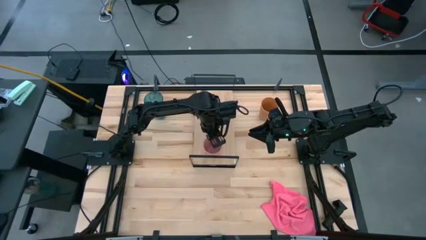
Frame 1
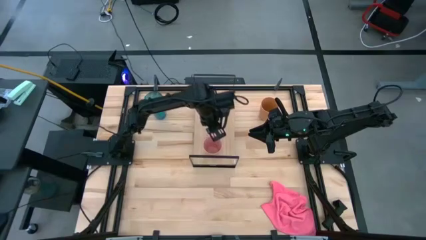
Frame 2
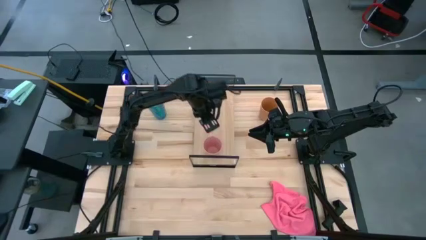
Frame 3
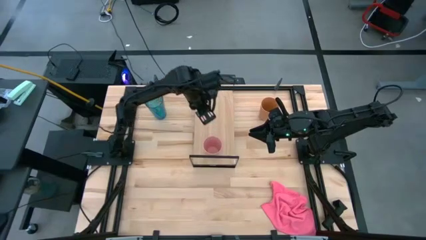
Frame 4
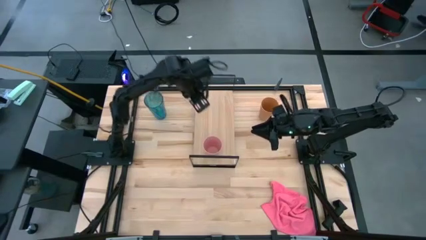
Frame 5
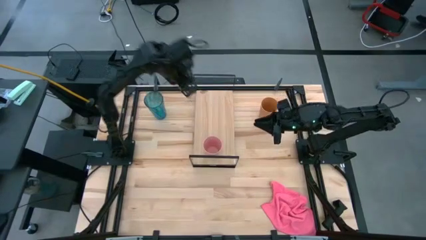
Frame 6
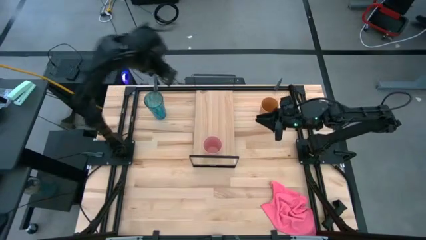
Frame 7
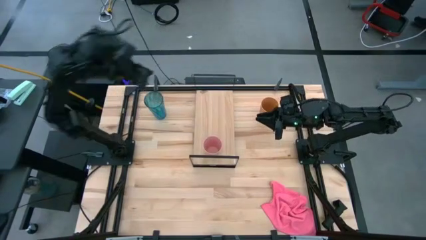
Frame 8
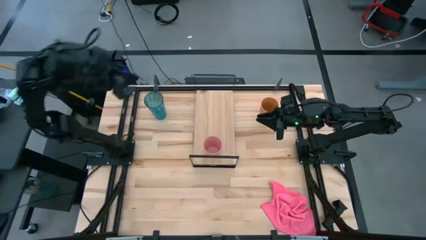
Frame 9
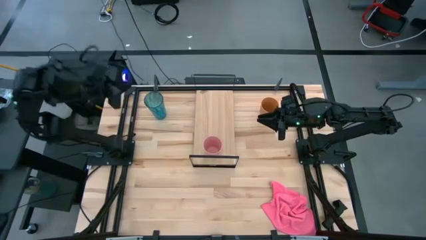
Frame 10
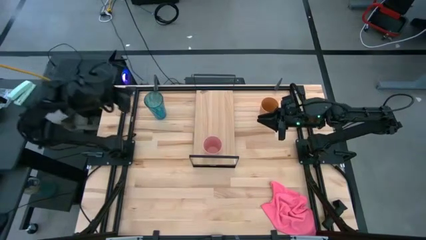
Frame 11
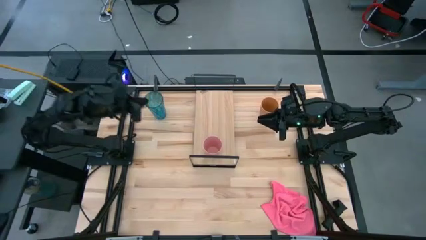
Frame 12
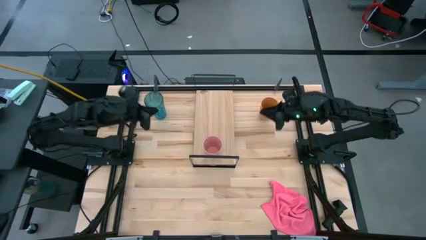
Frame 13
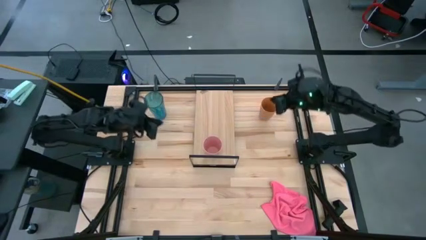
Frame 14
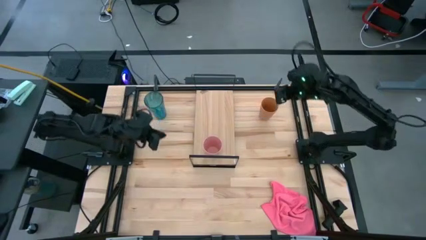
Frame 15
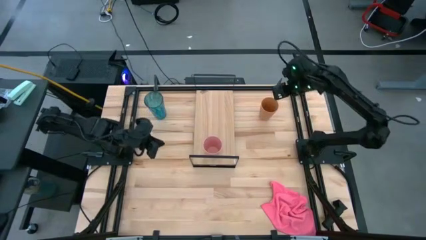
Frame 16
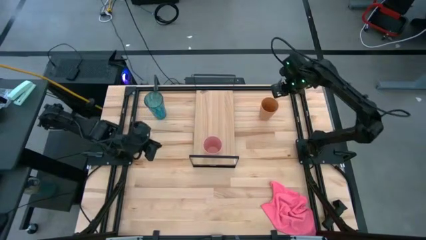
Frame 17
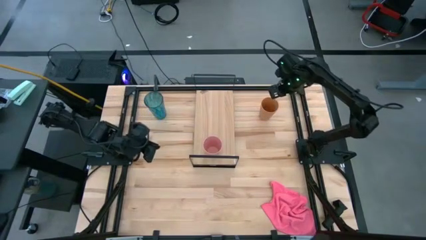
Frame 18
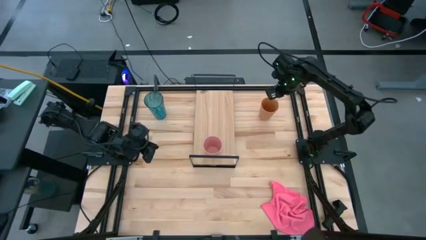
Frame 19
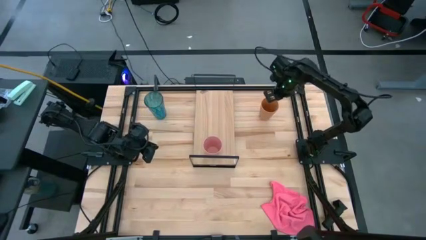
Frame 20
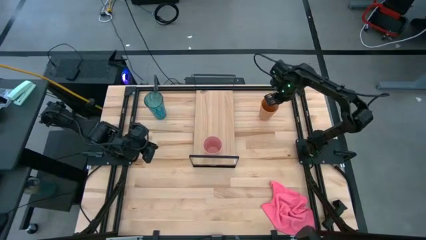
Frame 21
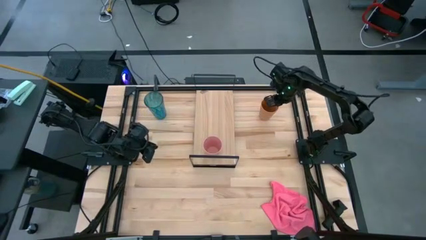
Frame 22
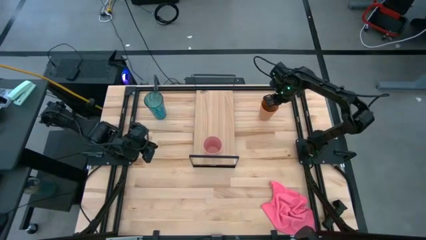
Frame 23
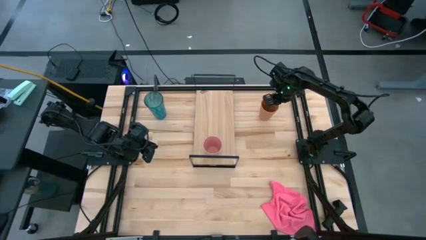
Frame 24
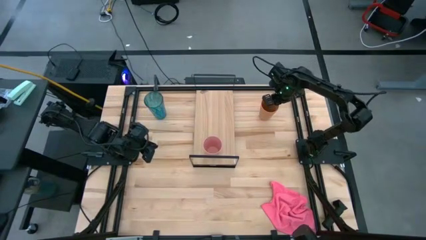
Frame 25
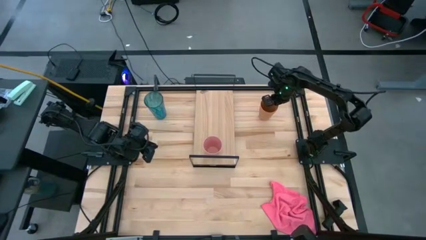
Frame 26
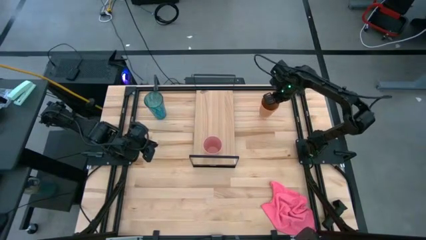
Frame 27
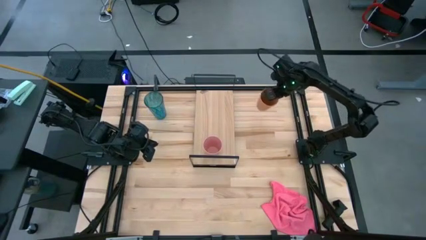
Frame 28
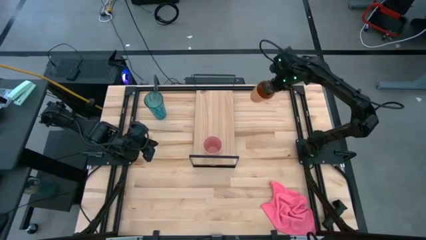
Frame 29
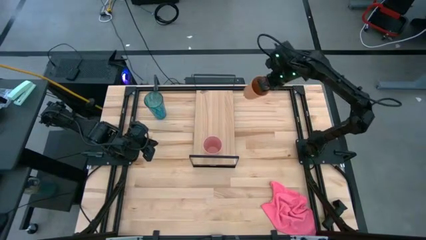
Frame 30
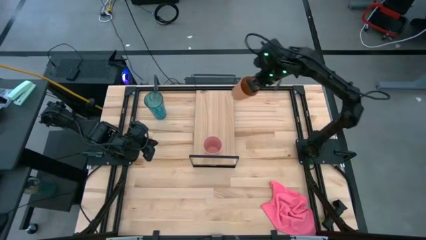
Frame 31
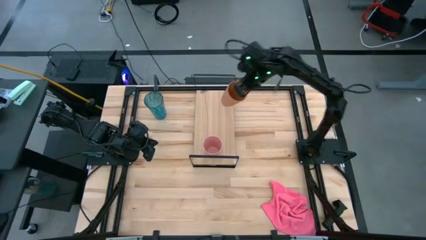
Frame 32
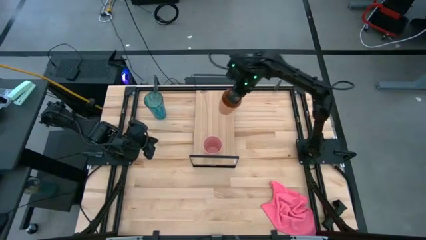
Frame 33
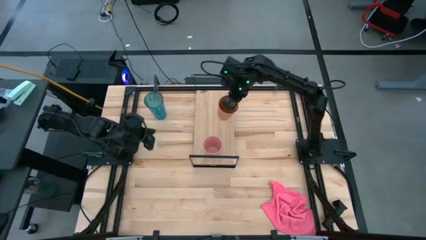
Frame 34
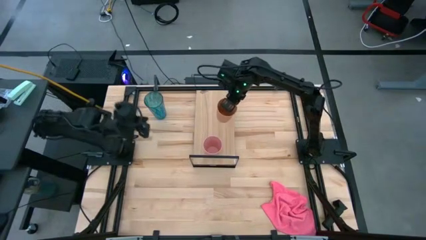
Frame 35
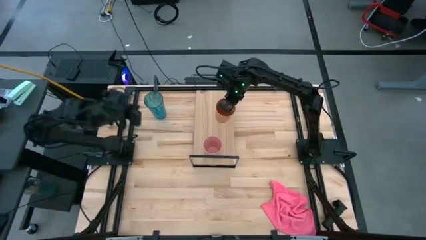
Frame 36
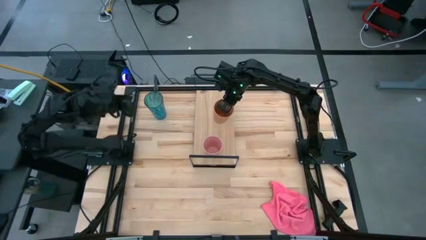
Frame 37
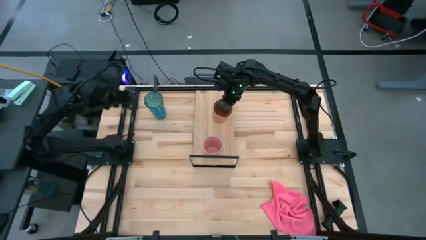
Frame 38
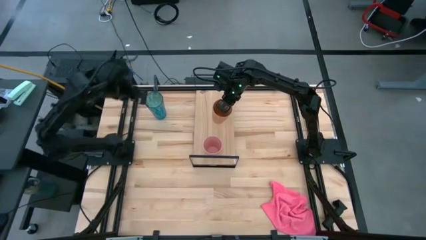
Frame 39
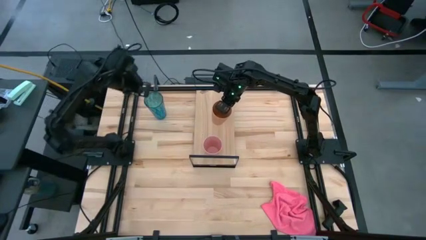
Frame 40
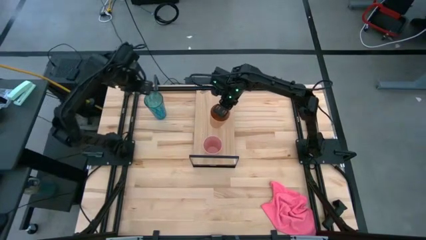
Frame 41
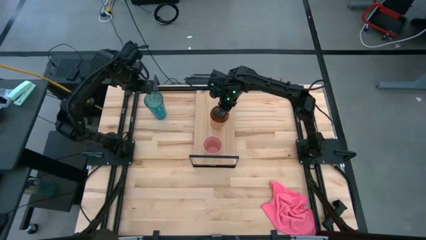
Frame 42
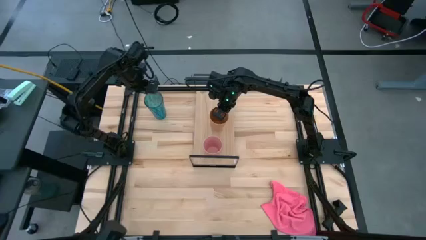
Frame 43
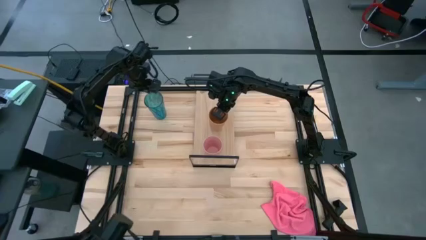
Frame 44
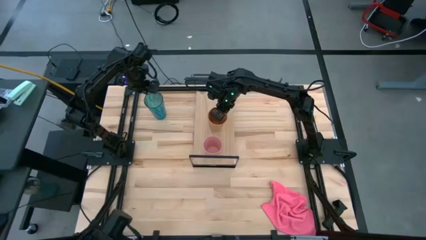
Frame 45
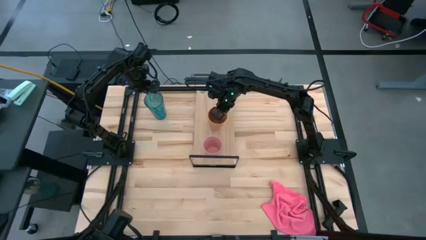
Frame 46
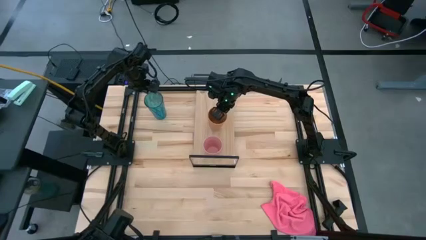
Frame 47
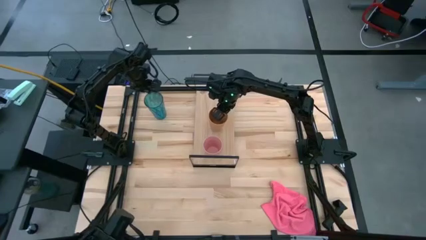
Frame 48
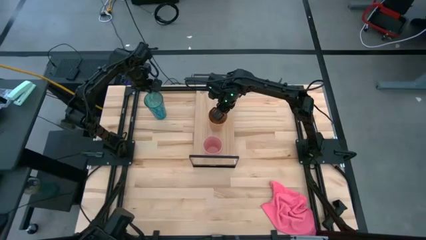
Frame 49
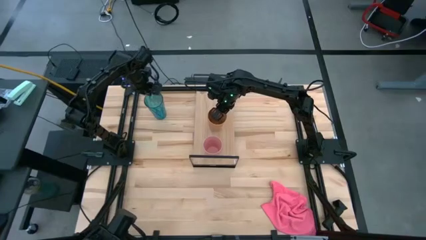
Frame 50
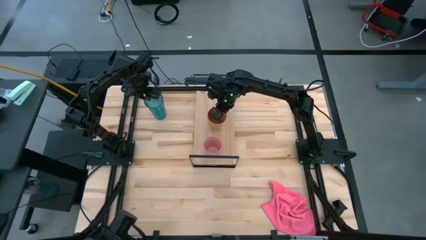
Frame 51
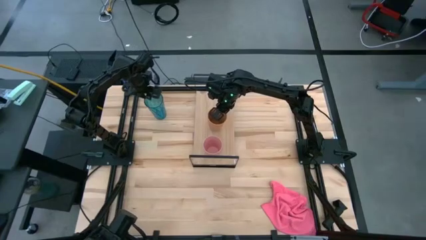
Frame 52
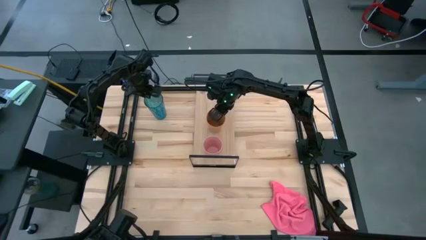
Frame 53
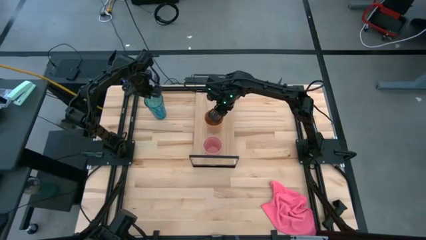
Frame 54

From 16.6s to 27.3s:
Task: Stack small to large cups/mugs on shelf
Put the brown cup on the shelf

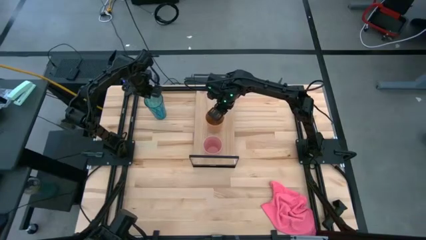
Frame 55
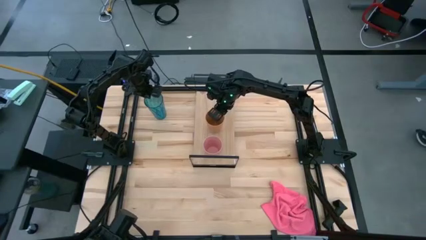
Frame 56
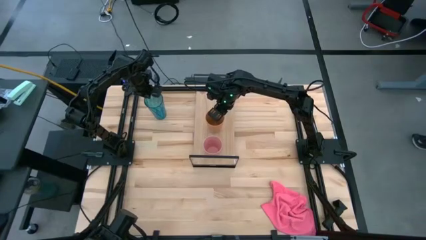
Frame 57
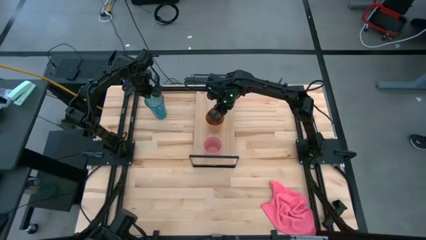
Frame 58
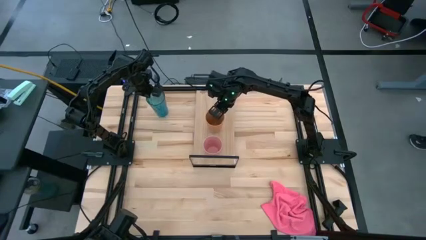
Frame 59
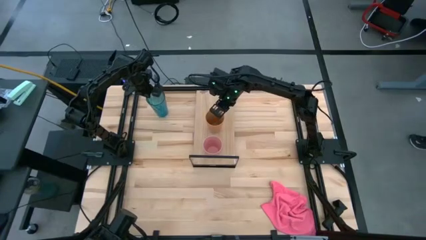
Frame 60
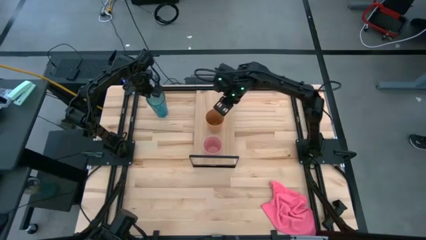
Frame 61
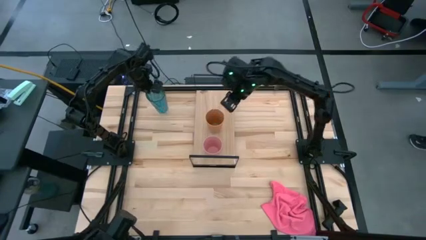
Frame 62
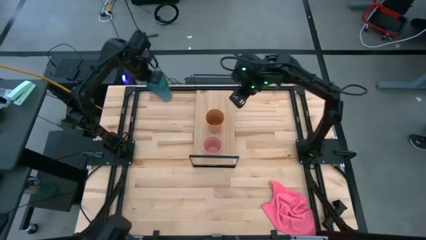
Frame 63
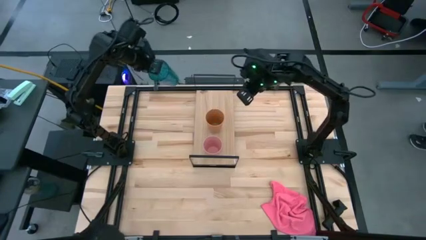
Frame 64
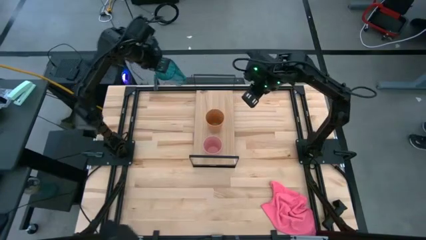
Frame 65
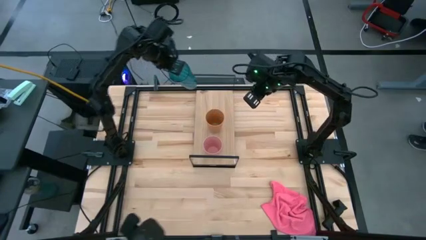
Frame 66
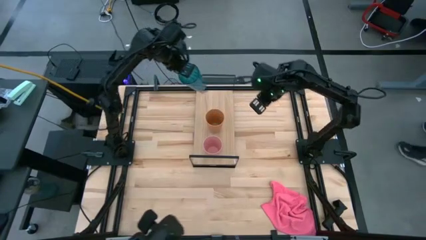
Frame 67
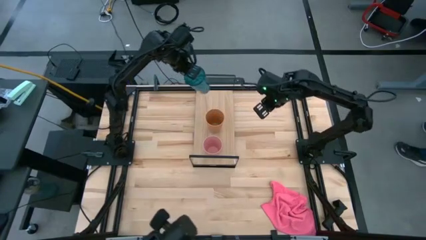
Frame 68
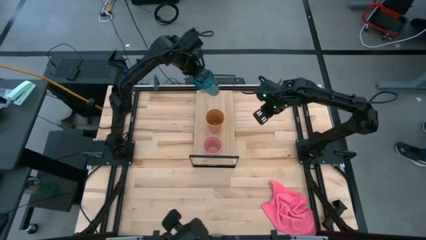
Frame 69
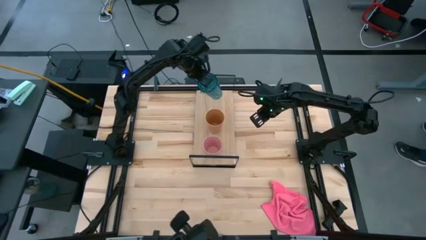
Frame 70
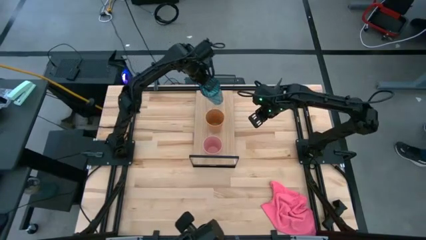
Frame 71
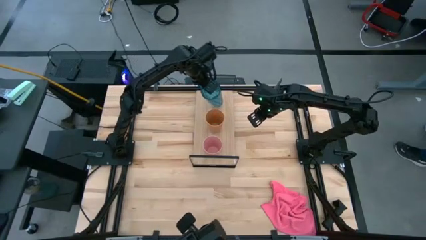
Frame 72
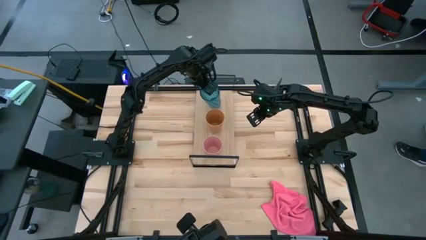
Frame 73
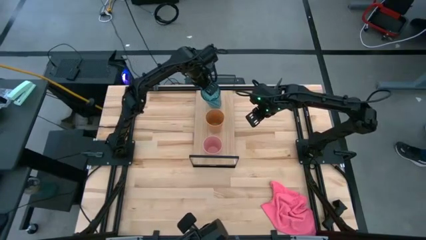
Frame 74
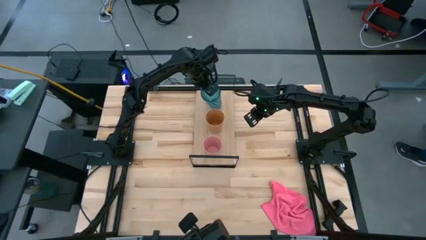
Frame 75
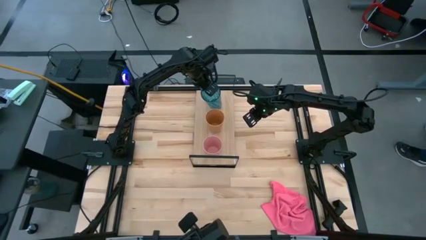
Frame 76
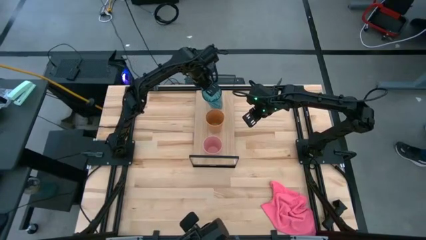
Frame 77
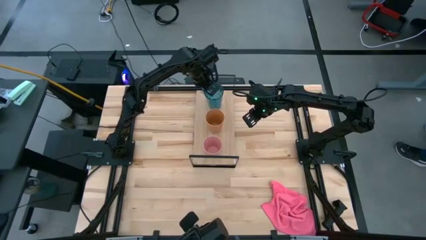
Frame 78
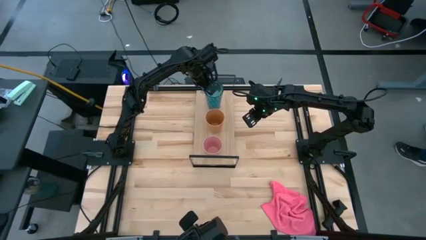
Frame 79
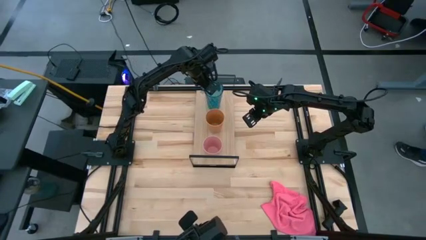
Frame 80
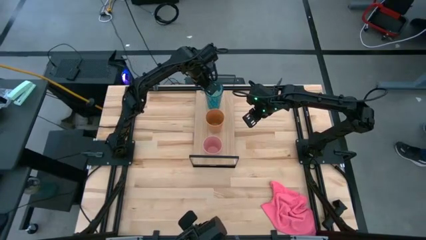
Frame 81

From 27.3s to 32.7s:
Put the blue cup on the shelf

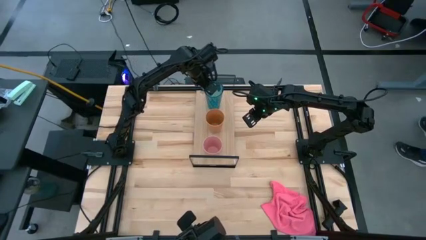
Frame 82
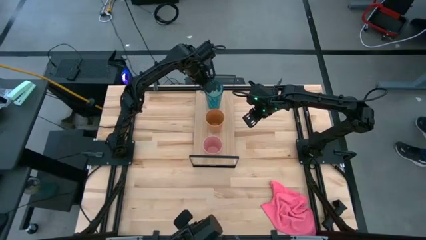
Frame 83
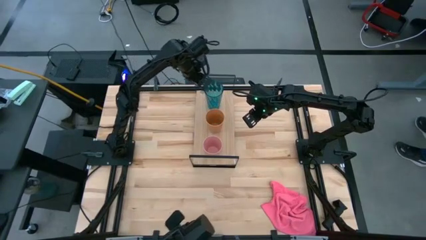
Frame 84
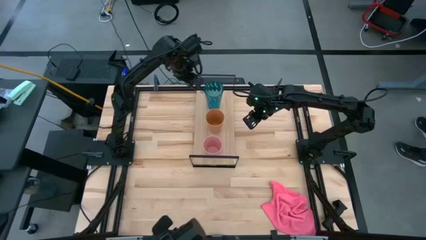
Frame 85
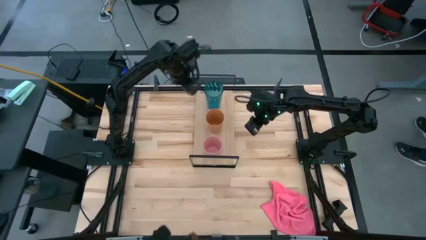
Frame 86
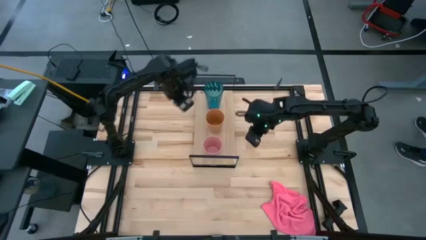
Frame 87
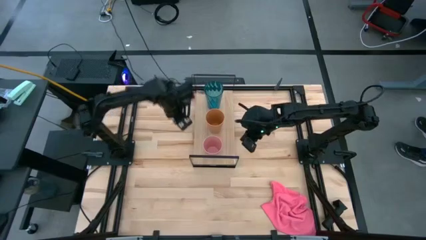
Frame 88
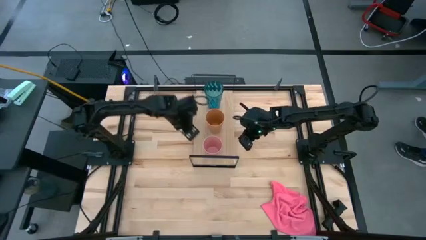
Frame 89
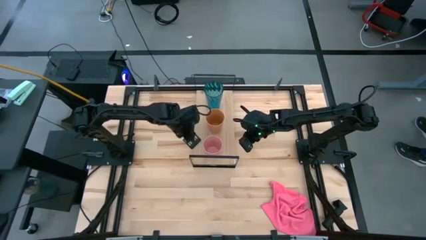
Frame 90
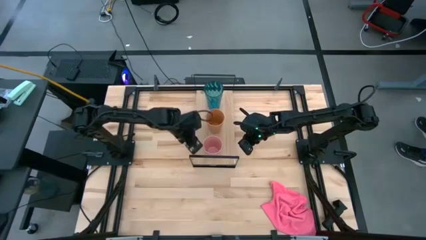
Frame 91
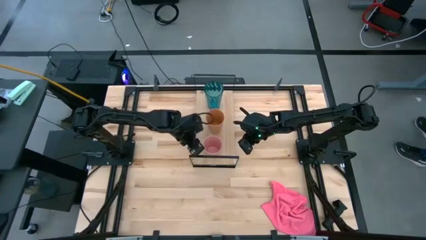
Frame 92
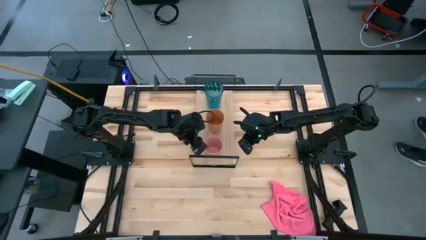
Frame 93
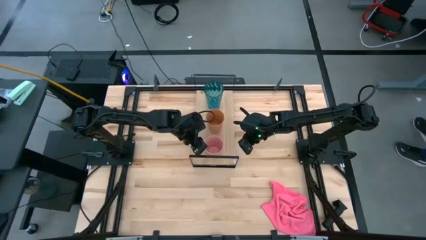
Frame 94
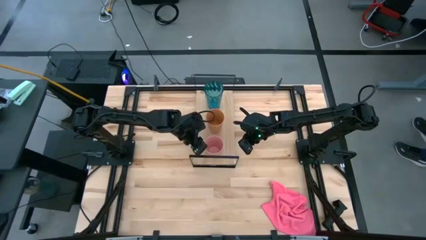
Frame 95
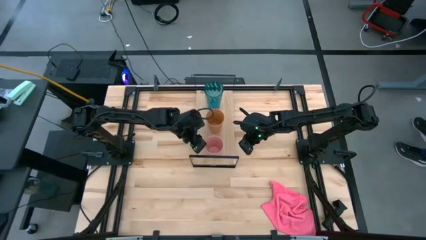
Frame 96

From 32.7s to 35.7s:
Adjust the pink cup on the shelf
